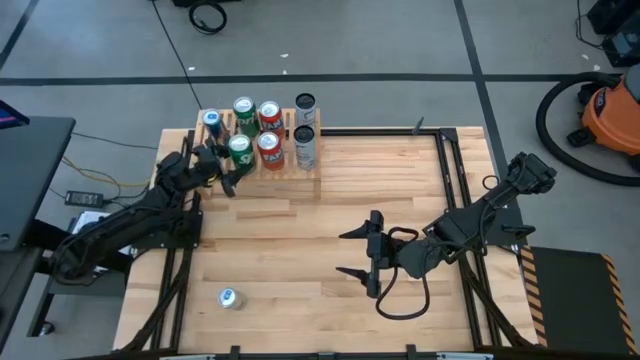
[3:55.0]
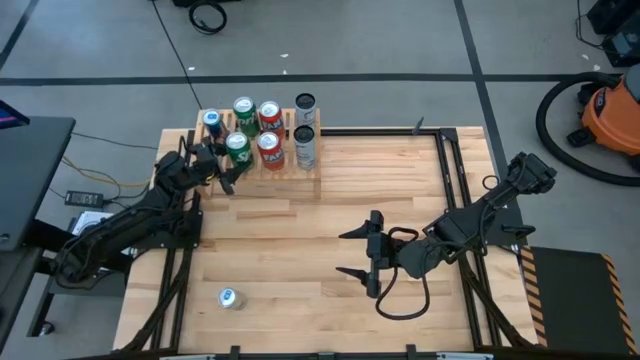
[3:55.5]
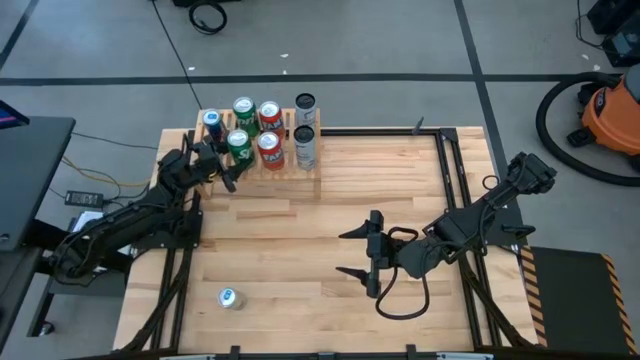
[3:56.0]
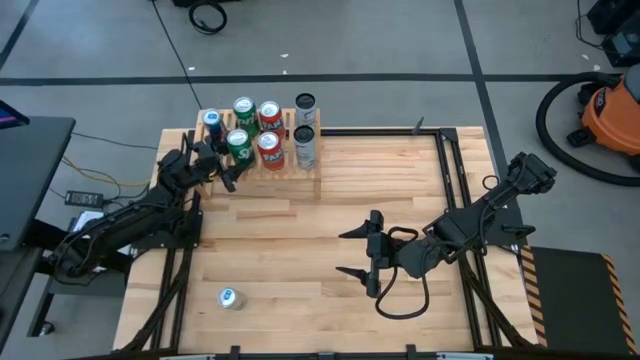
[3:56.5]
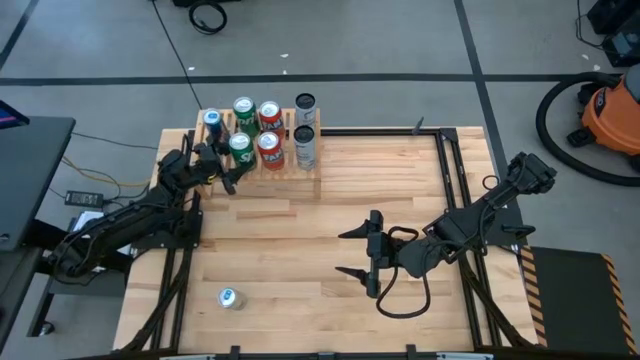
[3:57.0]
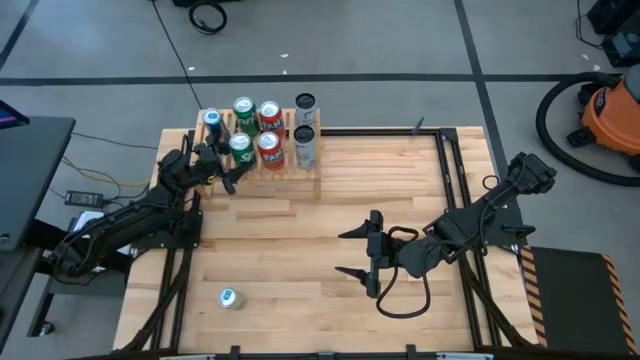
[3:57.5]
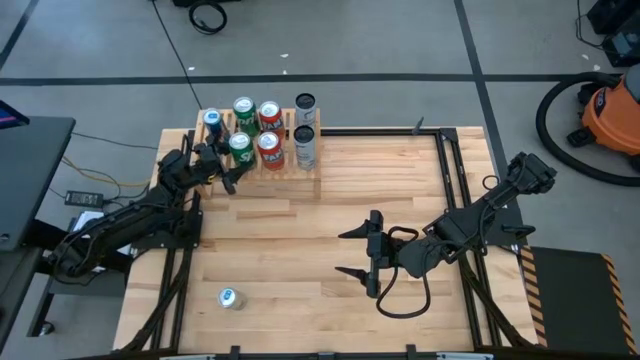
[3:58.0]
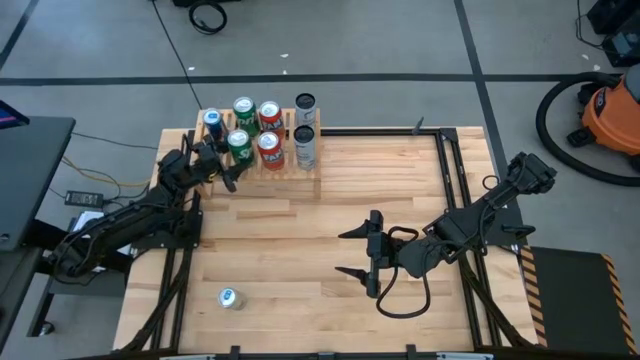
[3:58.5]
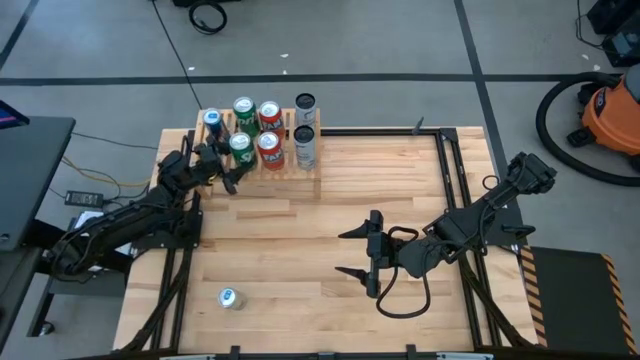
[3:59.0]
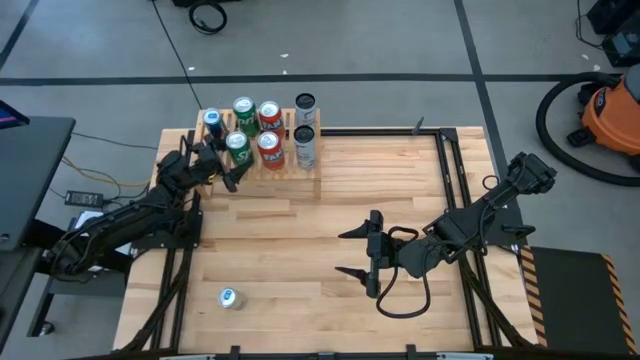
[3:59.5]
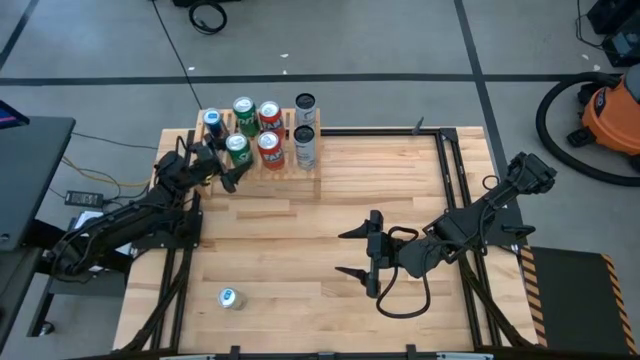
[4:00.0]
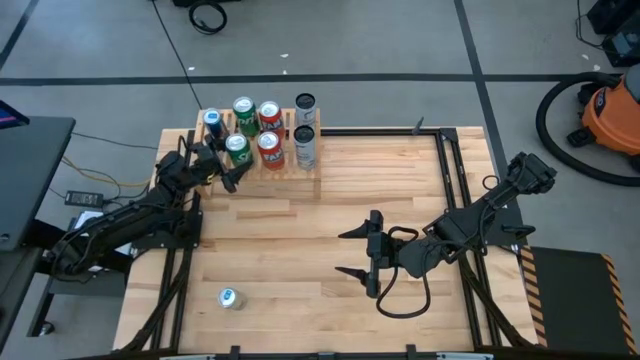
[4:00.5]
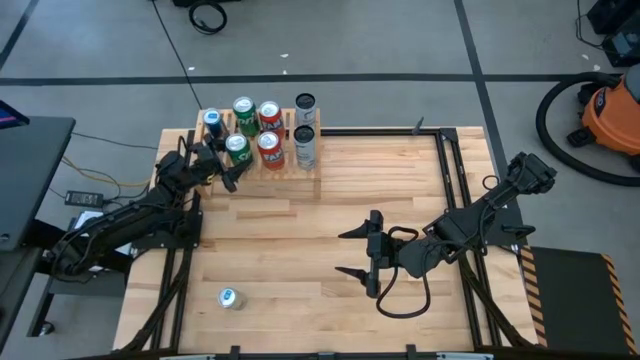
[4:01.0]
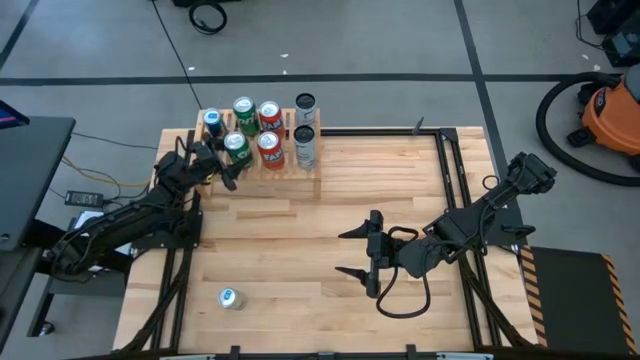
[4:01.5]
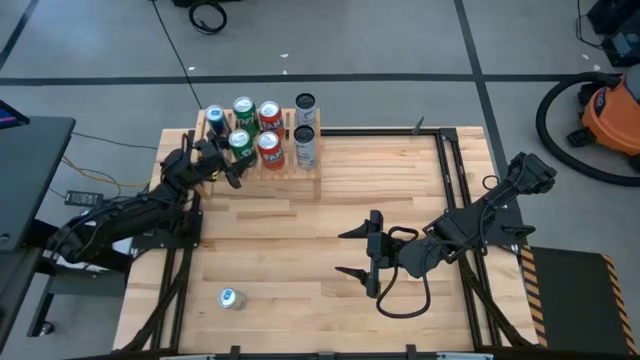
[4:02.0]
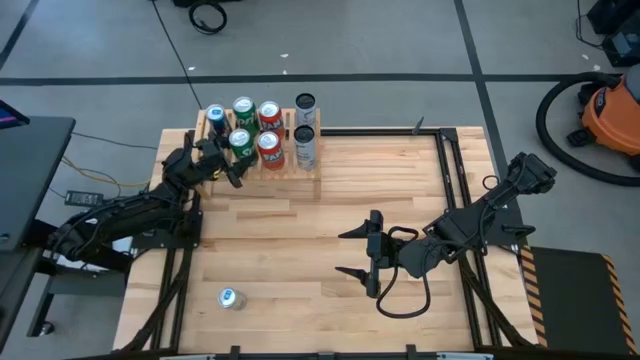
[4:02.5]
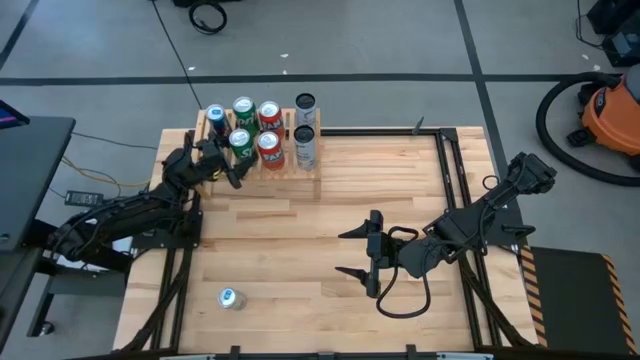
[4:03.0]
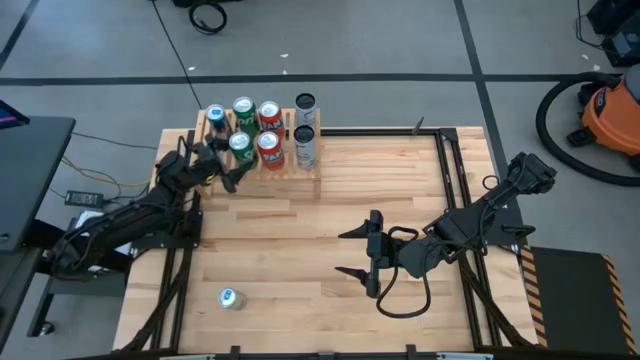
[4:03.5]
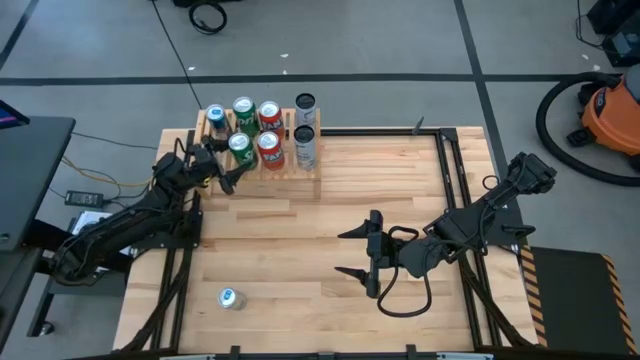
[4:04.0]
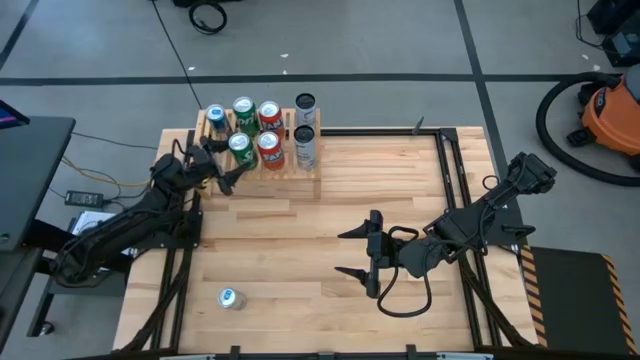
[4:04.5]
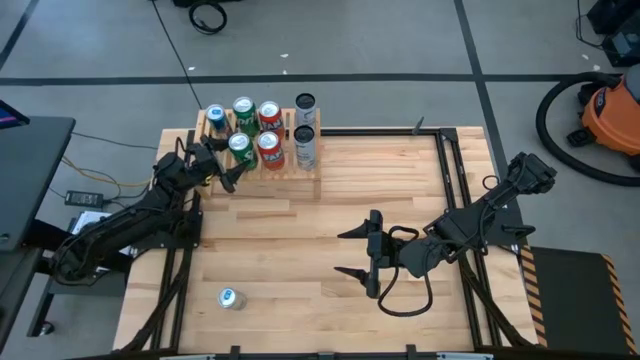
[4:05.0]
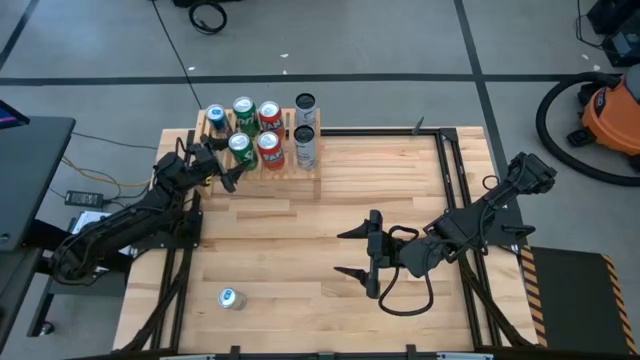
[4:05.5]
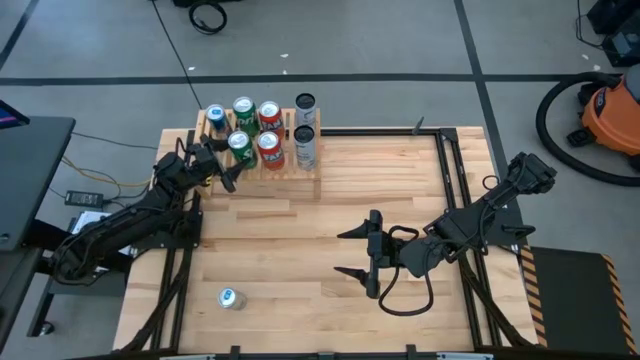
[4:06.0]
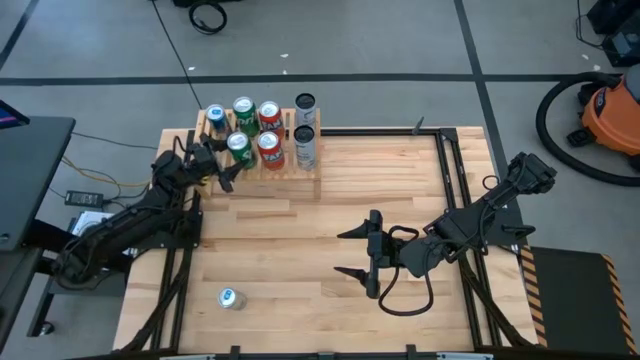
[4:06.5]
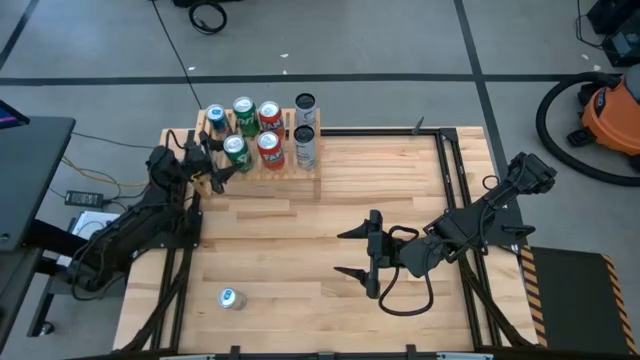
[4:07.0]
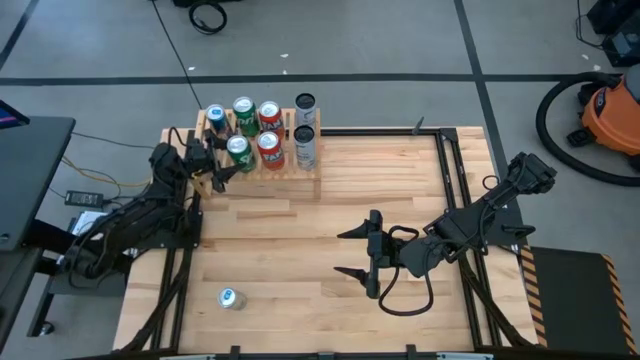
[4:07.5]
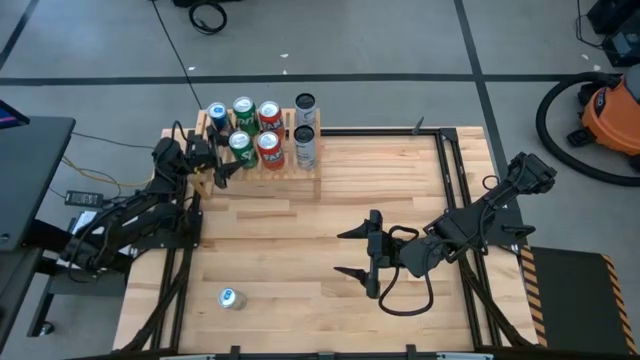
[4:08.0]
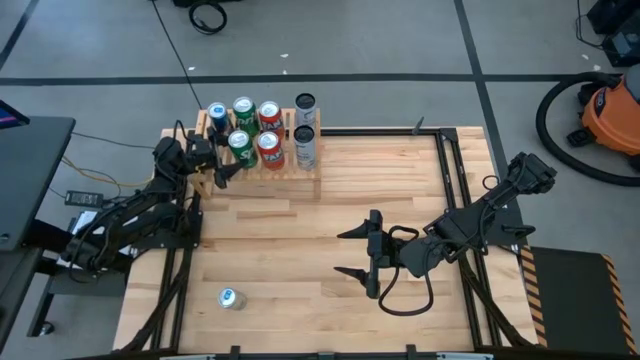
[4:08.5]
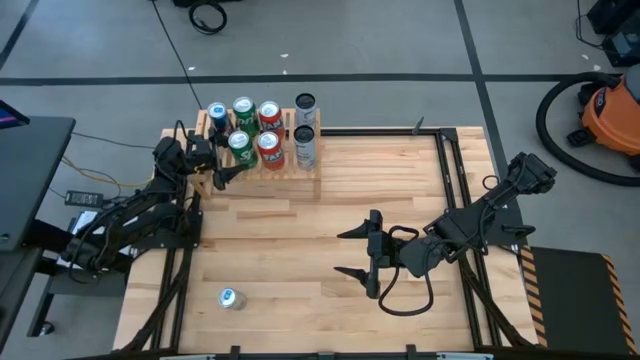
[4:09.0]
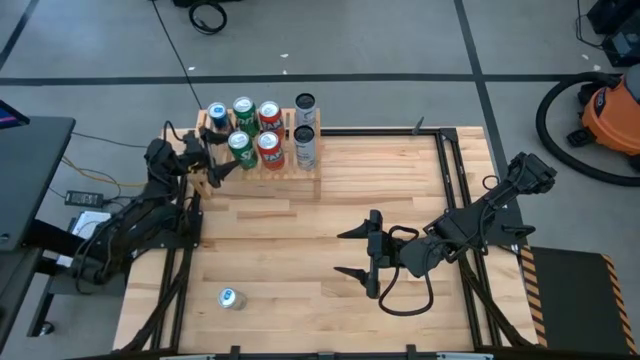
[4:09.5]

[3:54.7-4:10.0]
Task: Place canned beverage on shelf
Put the green soda can on the shelf

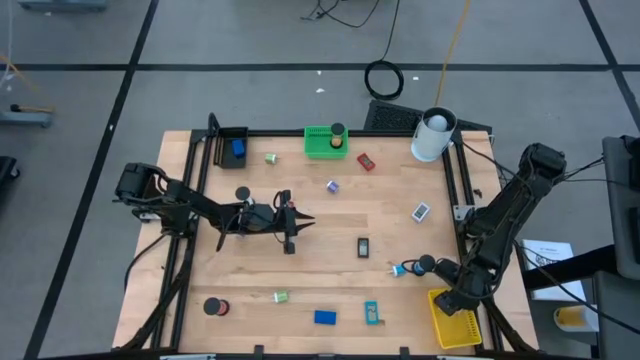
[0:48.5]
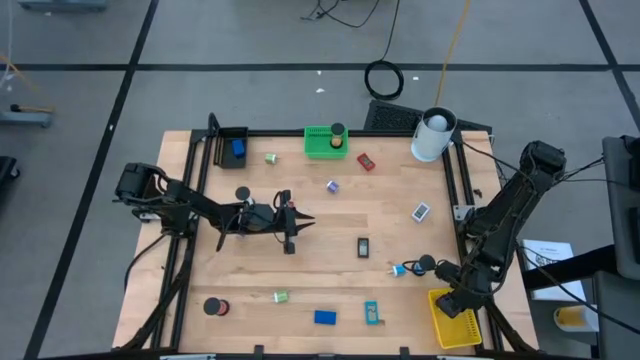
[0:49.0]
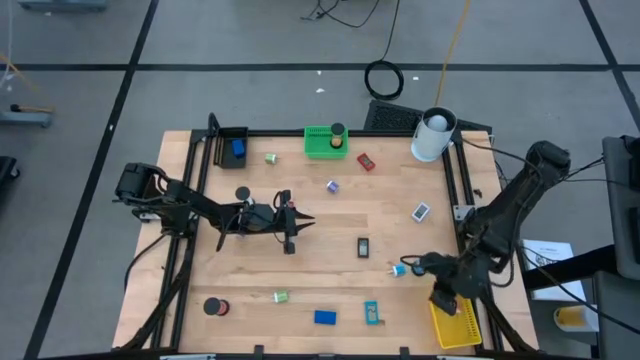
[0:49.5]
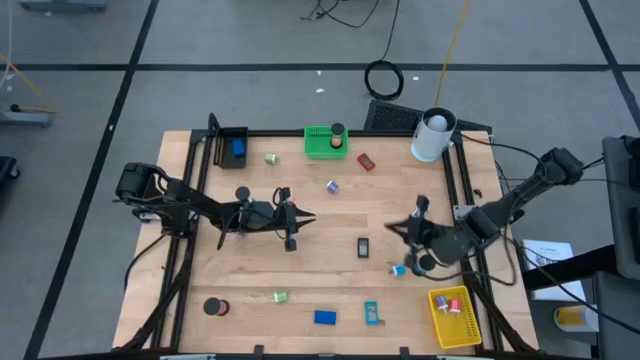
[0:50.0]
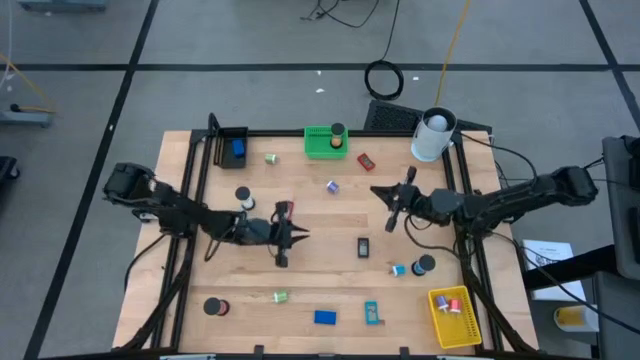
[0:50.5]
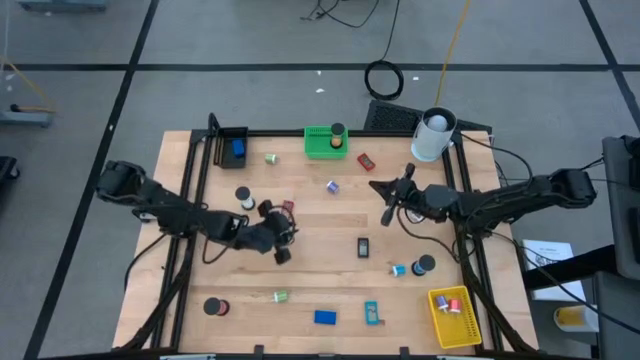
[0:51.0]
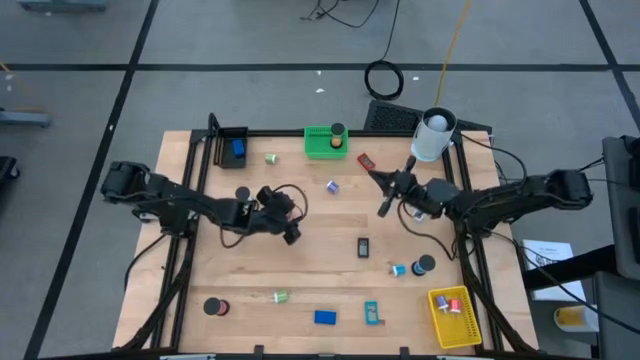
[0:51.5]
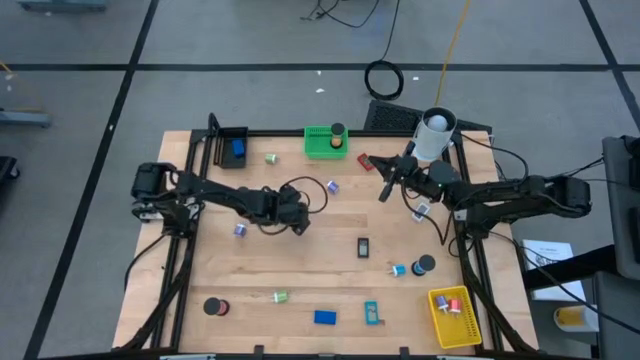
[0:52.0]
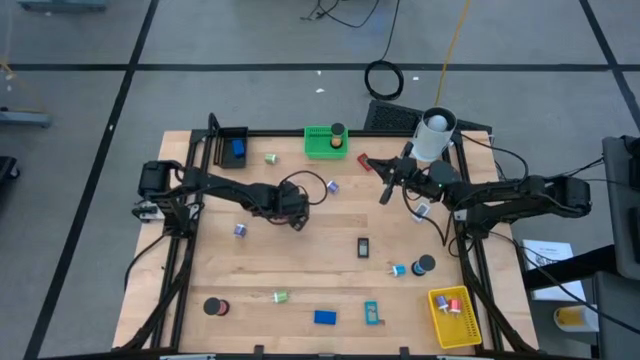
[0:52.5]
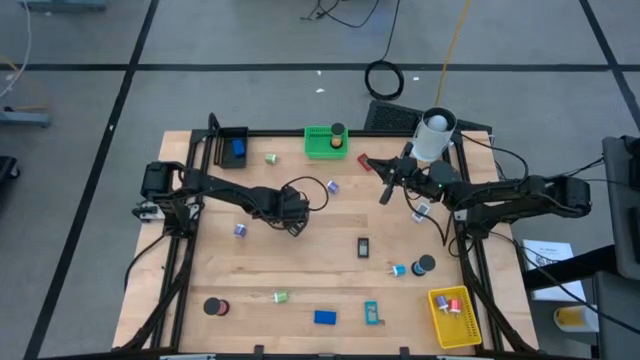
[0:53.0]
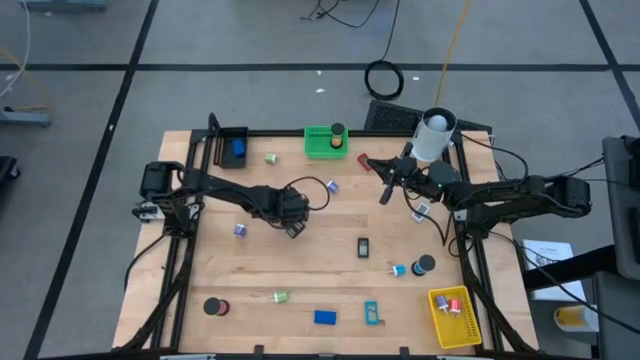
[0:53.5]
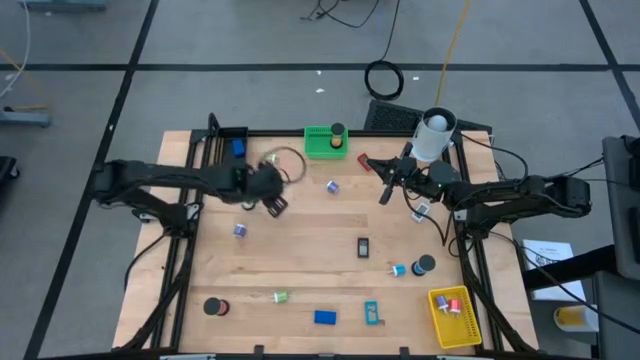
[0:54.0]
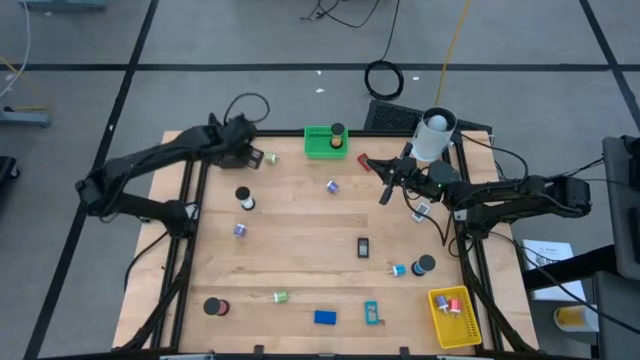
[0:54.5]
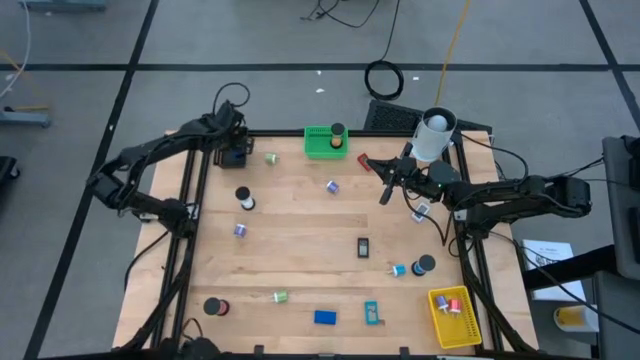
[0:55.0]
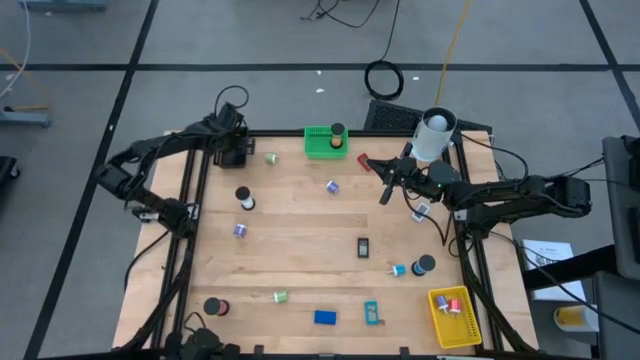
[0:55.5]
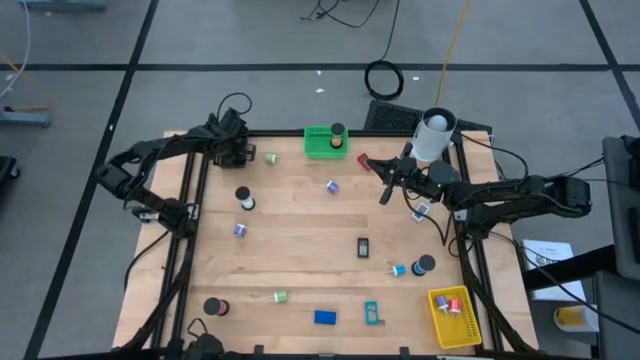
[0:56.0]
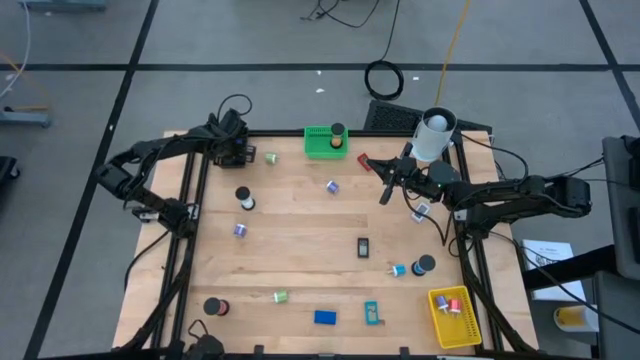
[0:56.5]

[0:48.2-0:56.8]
Task: Pick & Place Office items
Put the bottom red digital clock into the black basket
